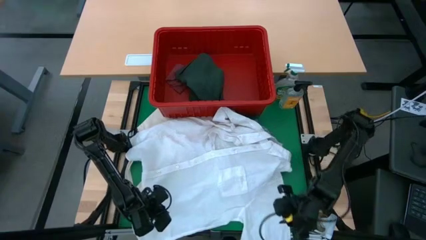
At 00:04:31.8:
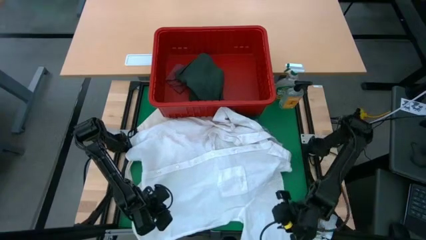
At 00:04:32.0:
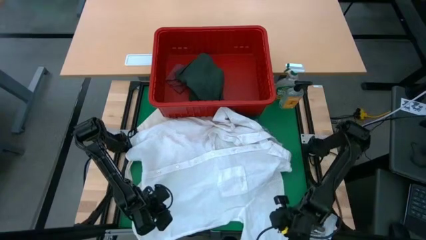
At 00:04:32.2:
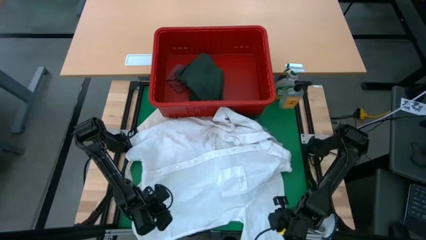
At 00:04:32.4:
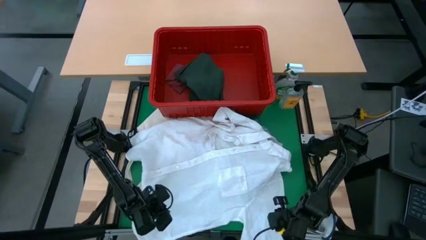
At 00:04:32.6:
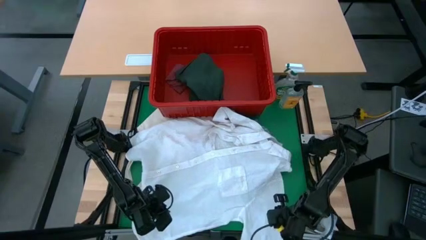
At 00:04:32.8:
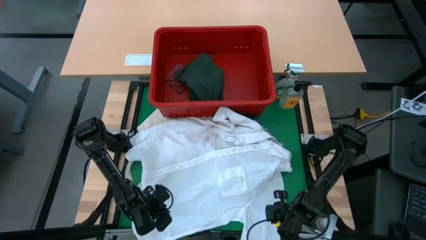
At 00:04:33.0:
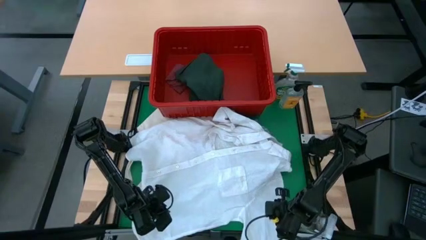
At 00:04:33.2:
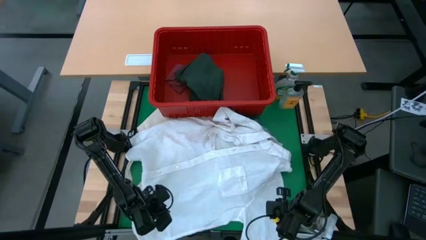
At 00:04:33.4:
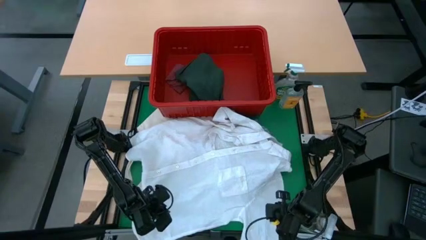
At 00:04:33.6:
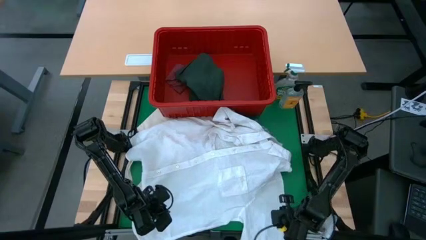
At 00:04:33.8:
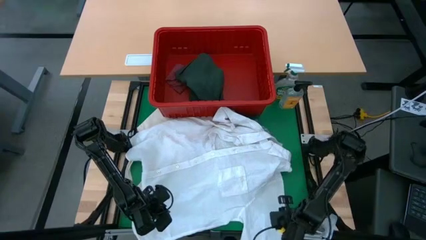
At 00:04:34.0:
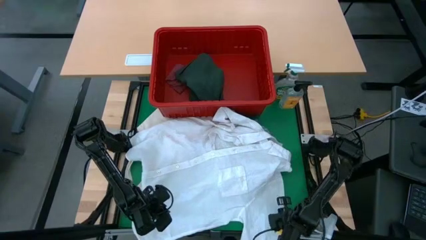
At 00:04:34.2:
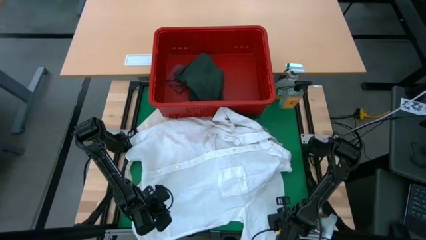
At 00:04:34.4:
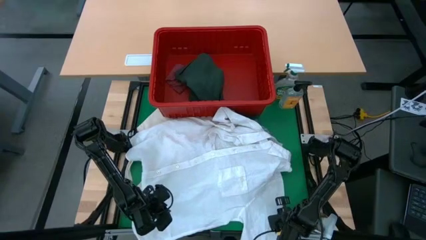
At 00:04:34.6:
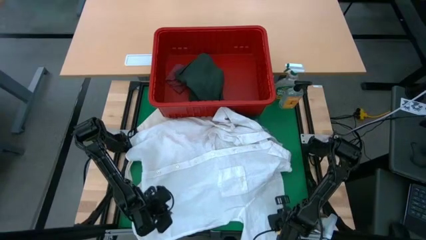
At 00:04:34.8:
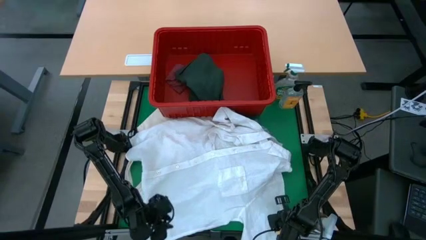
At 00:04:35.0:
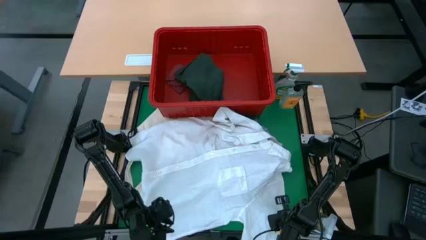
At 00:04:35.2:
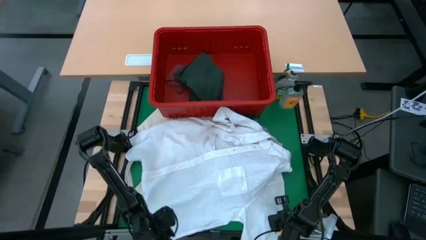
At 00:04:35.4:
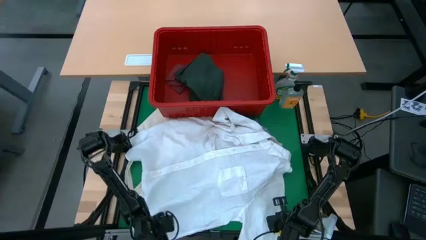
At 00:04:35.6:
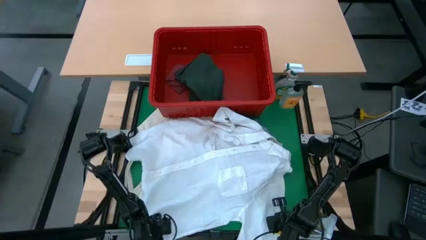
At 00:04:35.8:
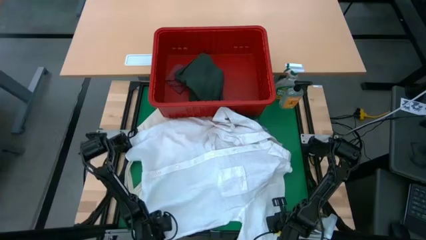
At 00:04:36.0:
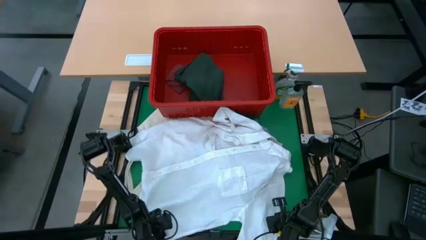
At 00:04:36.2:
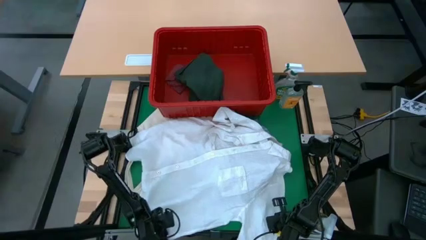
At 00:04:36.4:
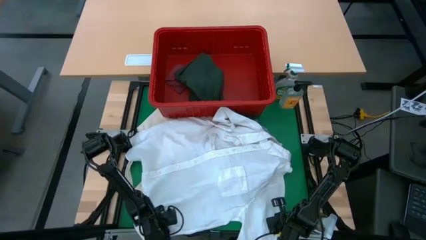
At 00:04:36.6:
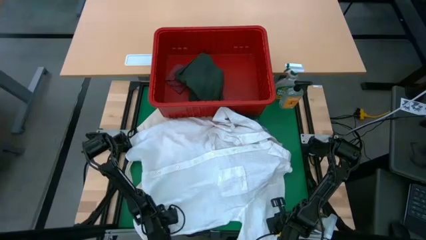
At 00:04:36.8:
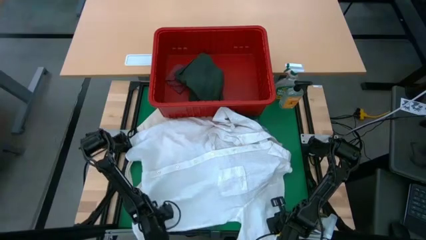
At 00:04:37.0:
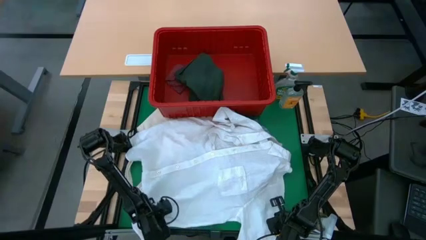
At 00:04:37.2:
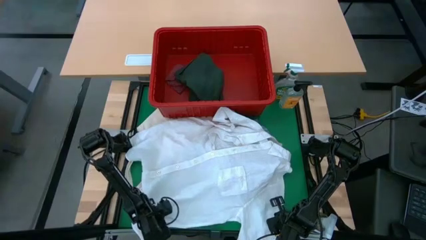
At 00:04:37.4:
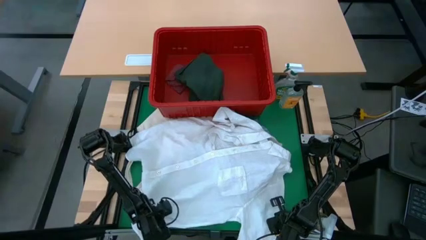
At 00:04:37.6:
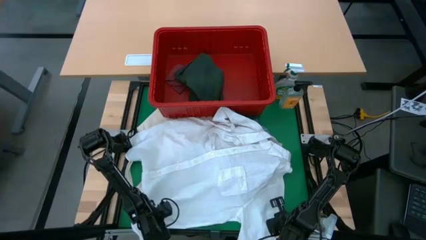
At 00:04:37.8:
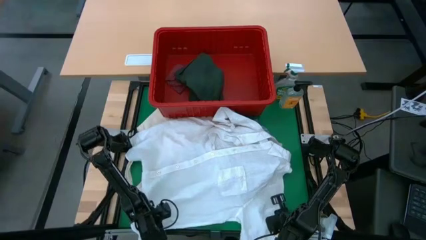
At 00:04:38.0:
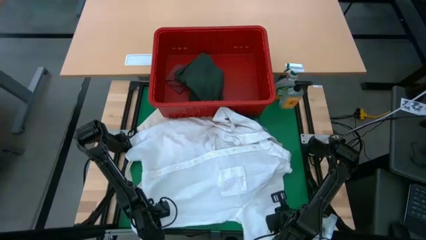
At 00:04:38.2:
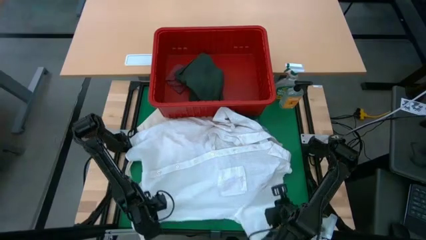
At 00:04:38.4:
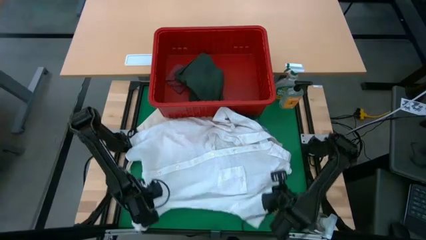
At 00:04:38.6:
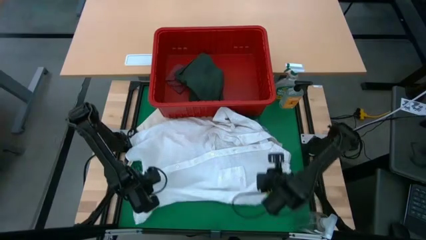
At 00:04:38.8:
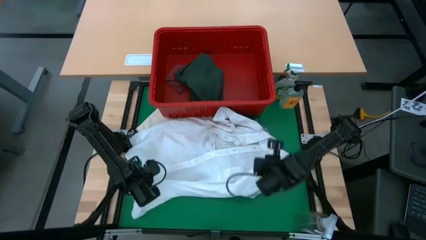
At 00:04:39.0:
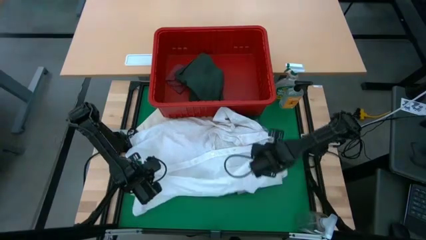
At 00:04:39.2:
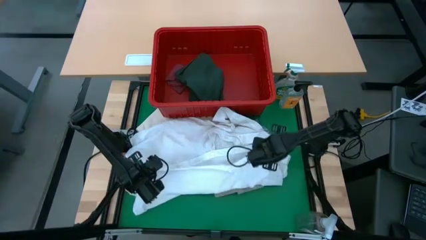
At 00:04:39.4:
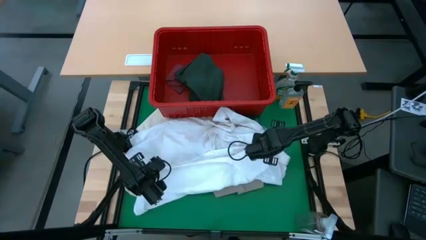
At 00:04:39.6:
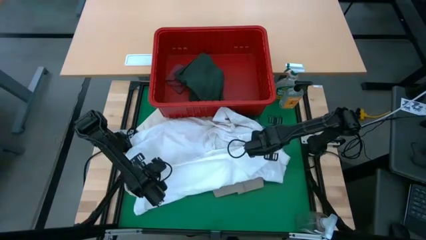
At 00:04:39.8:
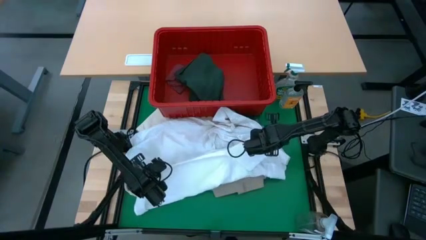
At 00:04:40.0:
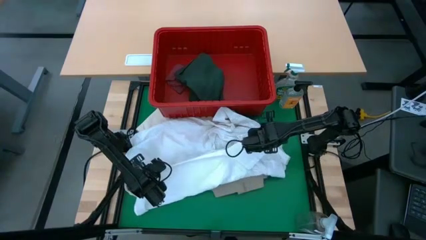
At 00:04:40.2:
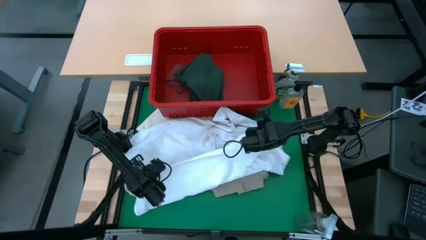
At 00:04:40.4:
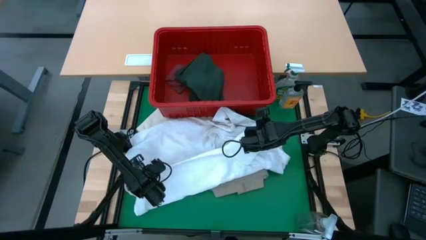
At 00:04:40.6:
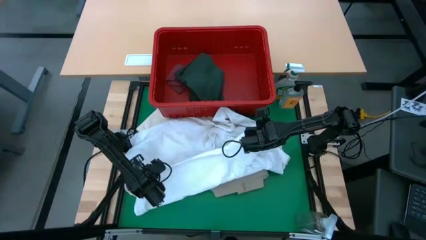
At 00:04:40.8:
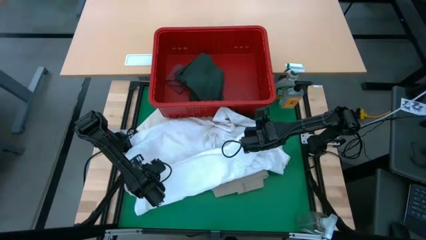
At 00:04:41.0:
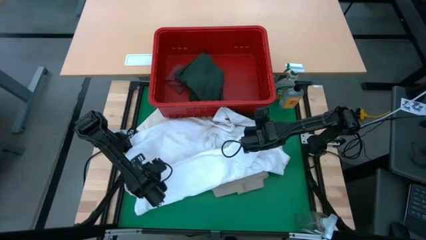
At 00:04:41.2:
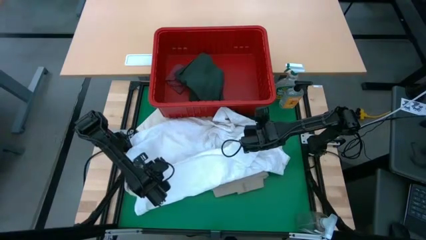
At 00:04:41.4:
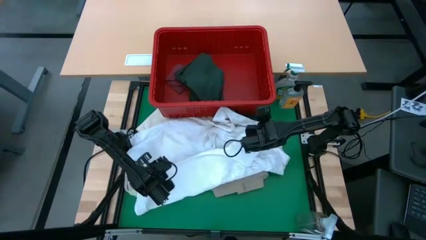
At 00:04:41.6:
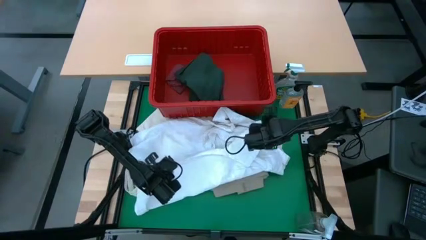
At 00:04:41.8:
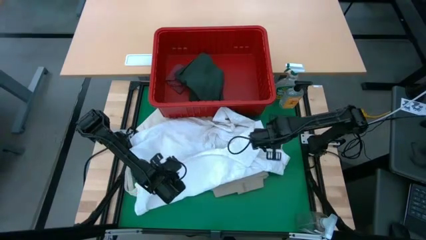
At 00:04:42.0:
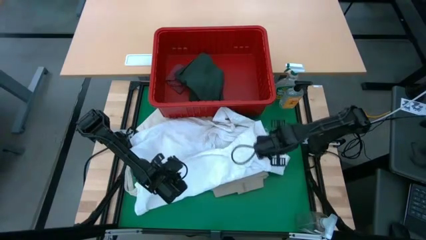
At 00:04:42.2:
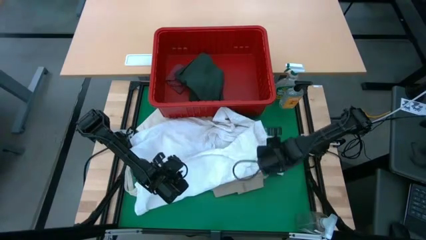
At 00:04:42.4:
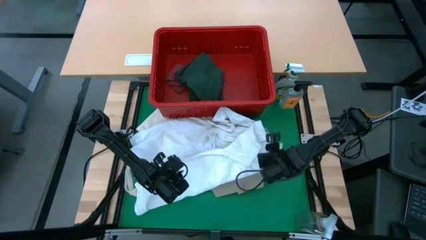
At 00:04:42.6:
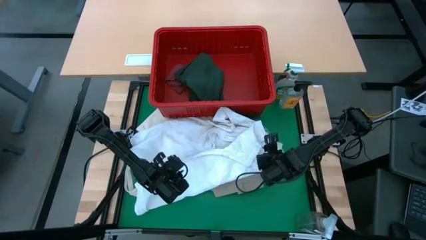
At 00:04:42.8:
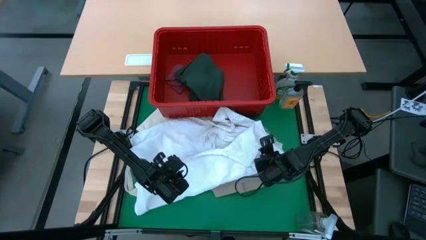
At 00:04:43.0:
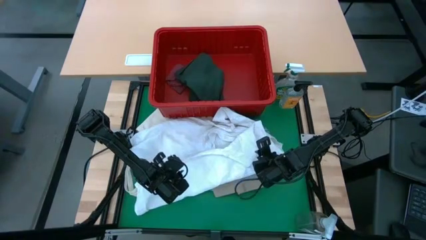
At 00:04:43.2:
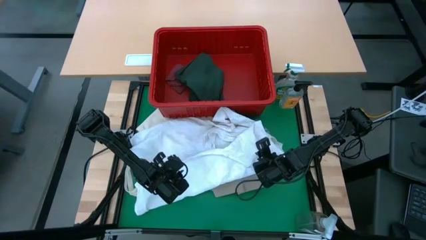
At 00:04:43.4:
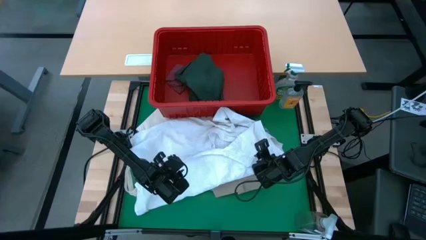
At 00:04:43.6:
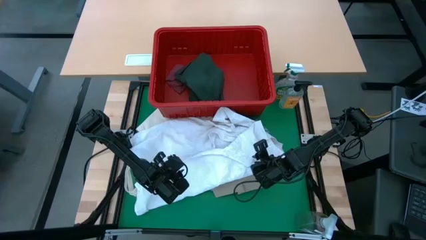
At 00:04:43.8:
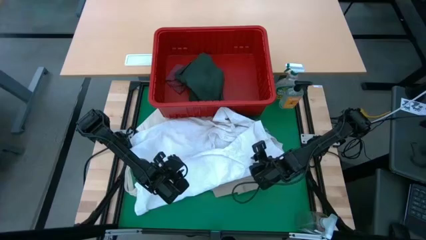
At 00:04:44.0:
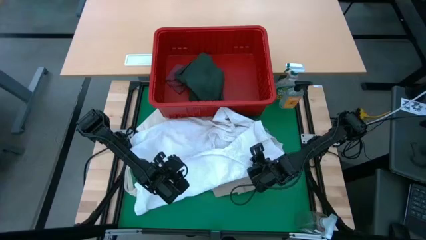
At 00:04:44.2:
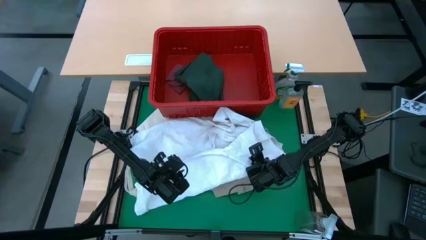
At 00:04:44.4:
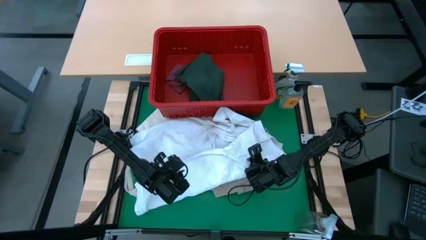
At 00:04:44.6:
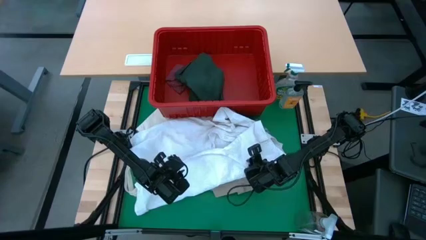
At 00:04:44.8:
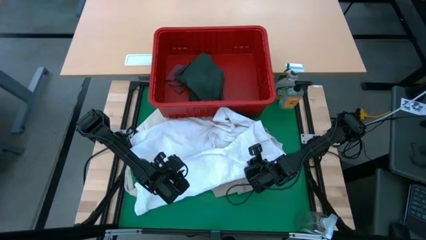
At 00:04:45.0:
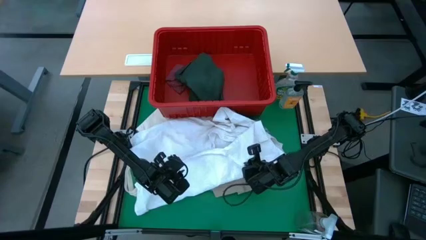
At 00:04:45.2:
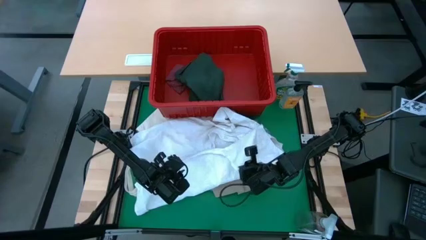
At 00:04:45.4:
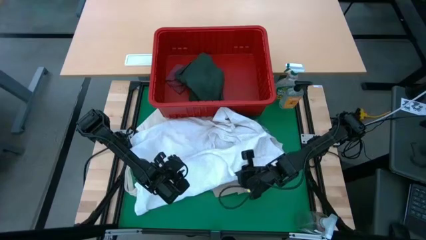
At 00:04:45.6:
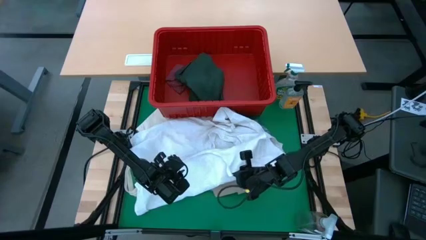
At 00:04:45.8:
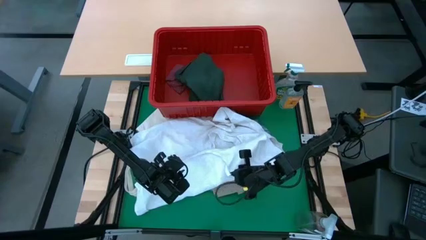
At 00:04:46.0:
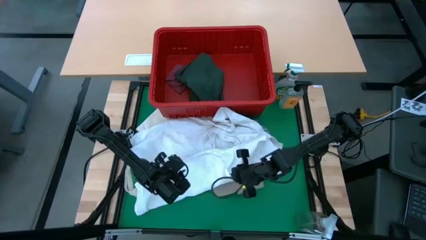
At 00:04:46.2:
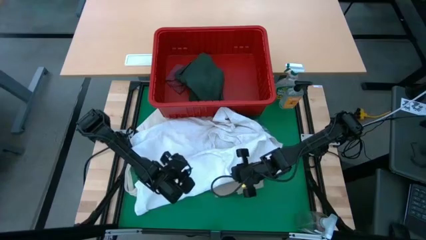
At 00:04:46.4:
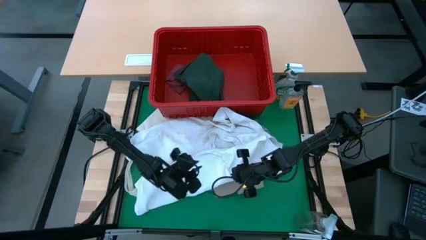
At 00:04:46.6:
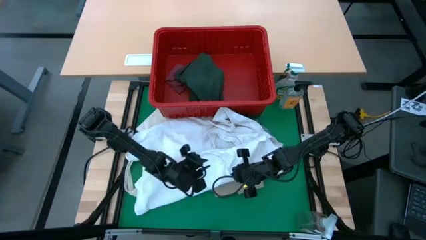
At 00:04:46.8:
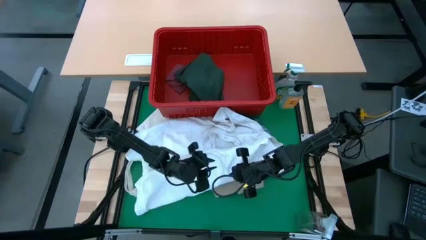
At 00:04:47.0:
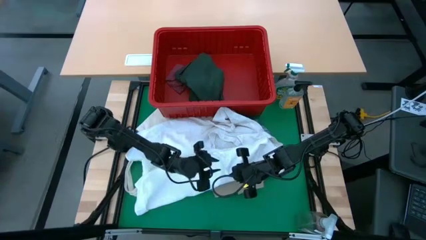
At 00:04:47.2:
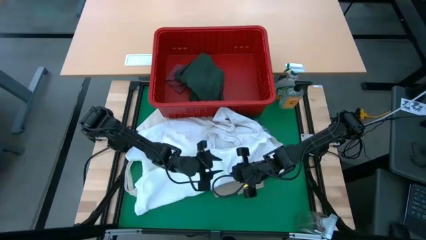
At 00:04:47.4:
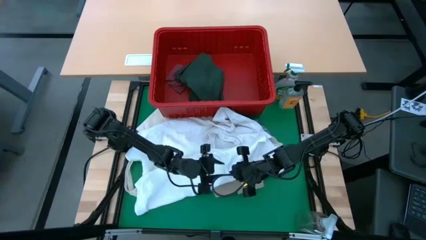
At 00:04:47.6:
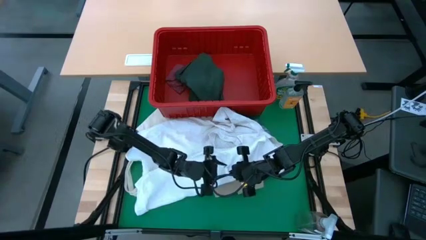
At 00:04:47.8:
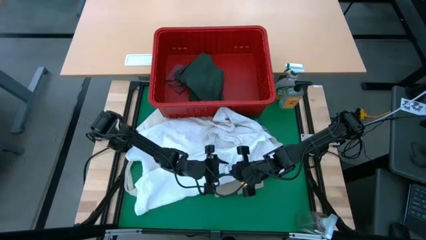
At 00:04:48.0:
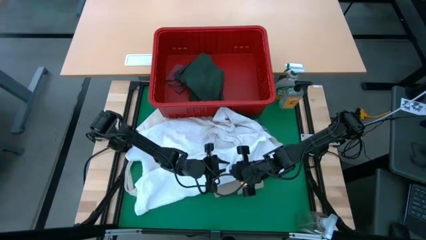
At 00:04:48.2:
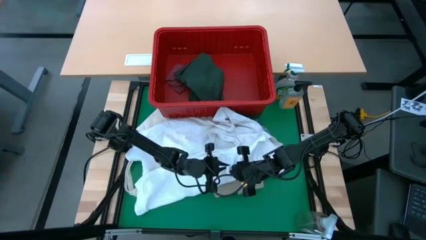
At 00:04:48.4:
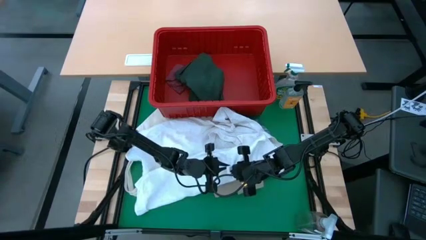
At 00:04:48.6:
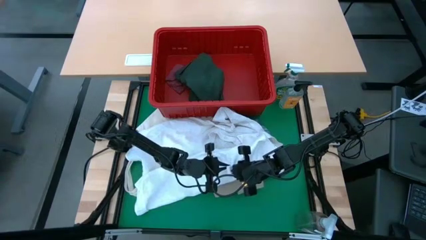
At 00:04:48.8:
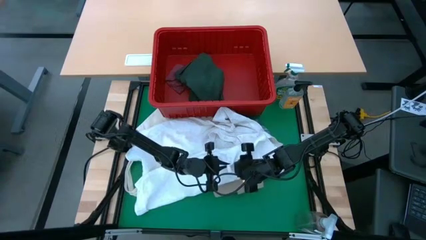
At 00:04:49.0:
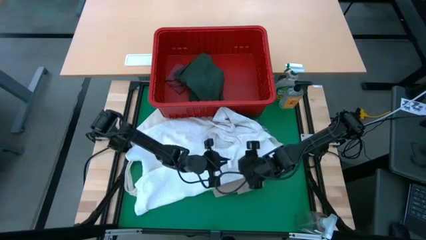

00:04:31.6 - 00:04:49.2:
Task: Fold Laundry from Bin
Fold the white polo shirt
